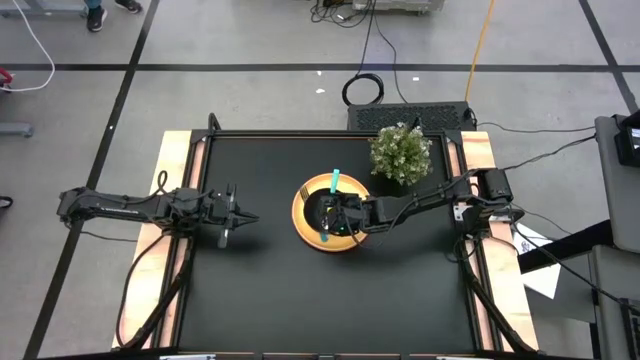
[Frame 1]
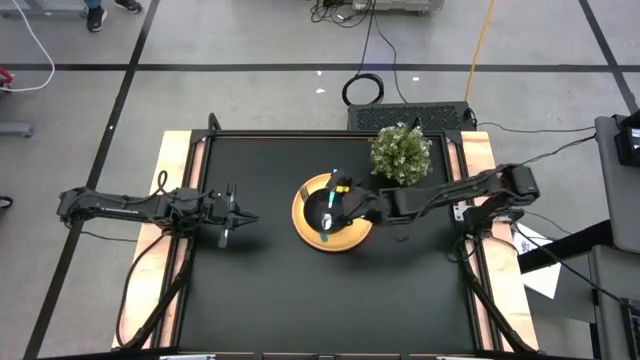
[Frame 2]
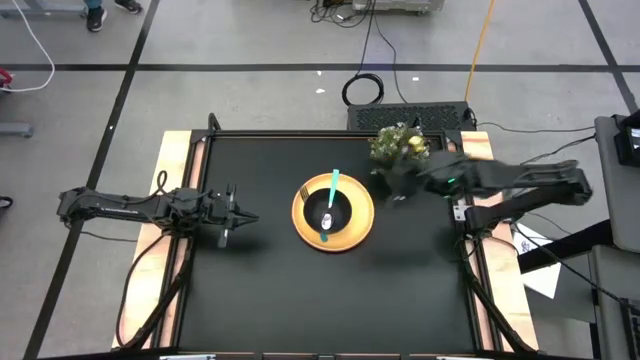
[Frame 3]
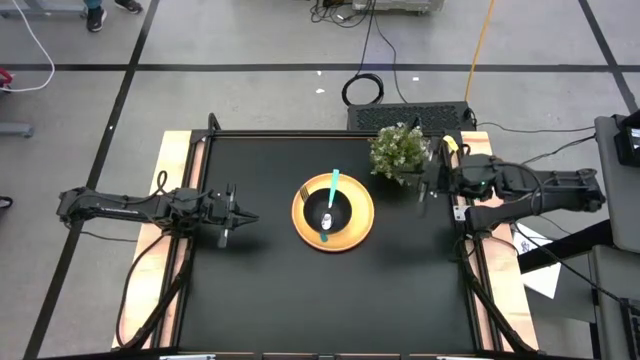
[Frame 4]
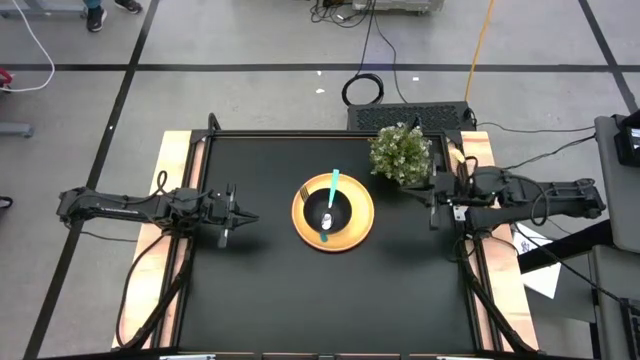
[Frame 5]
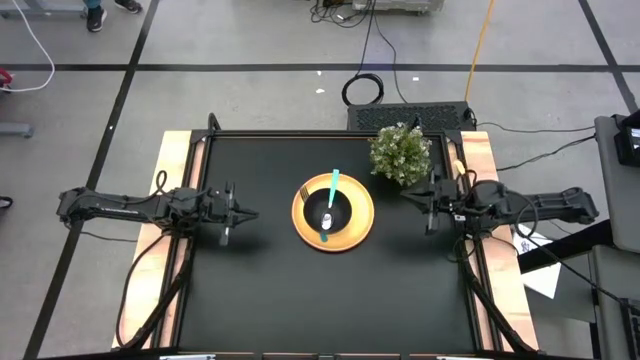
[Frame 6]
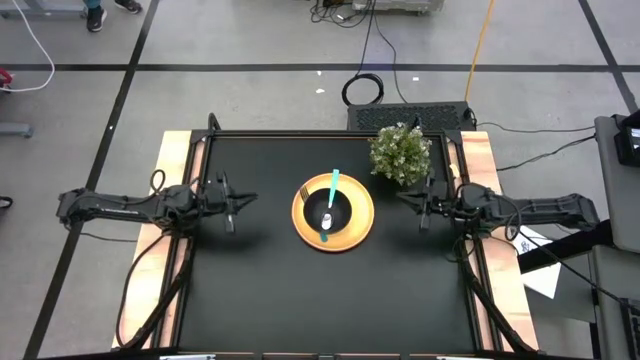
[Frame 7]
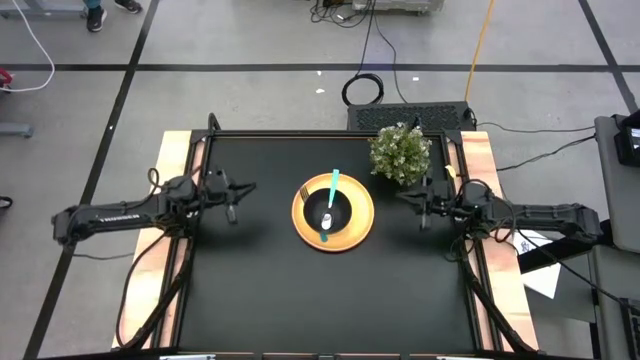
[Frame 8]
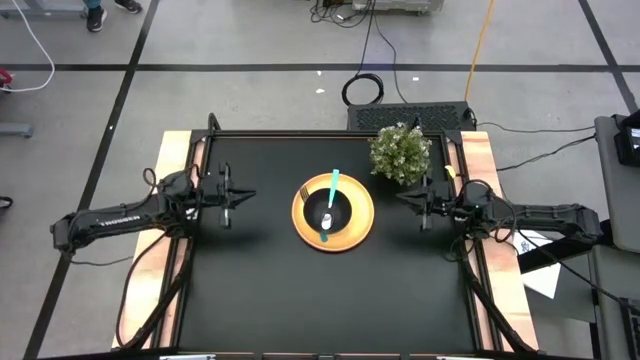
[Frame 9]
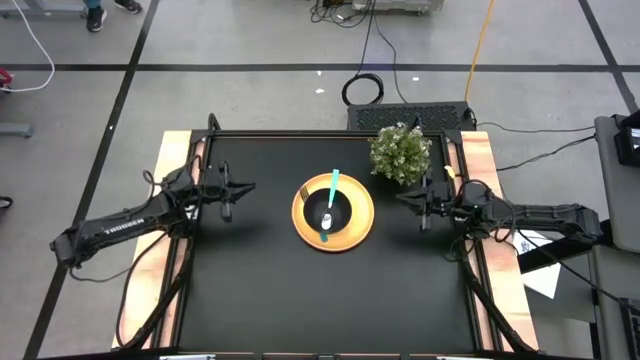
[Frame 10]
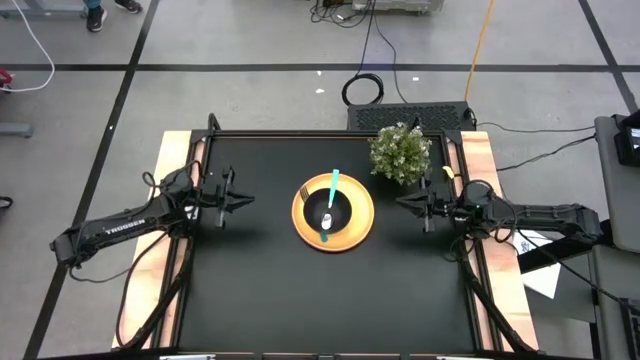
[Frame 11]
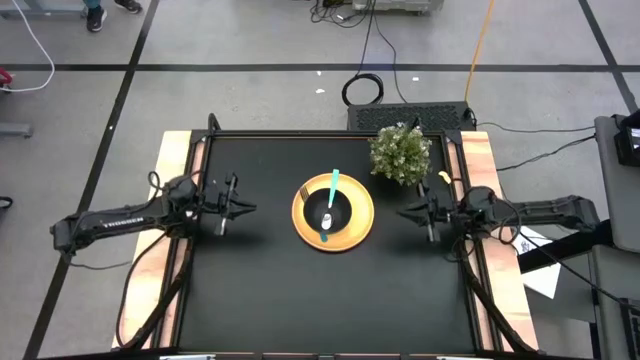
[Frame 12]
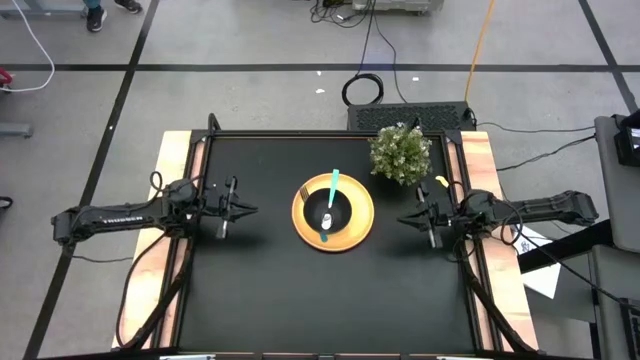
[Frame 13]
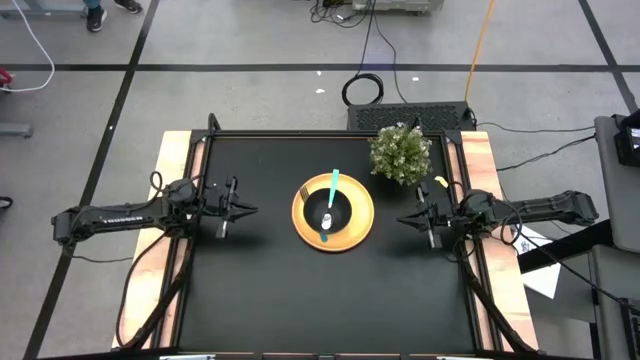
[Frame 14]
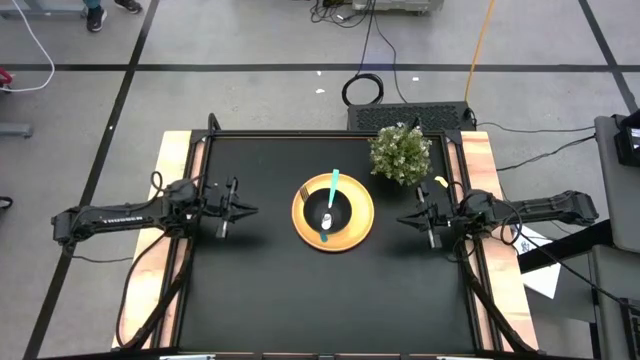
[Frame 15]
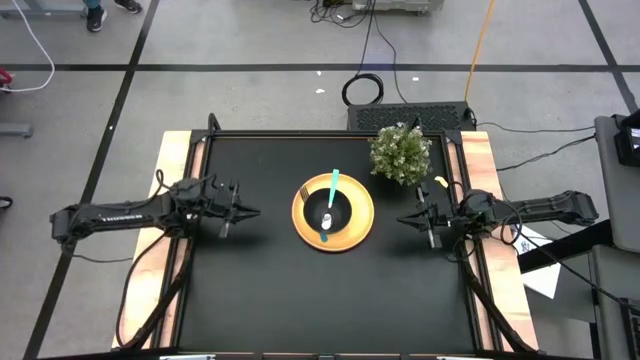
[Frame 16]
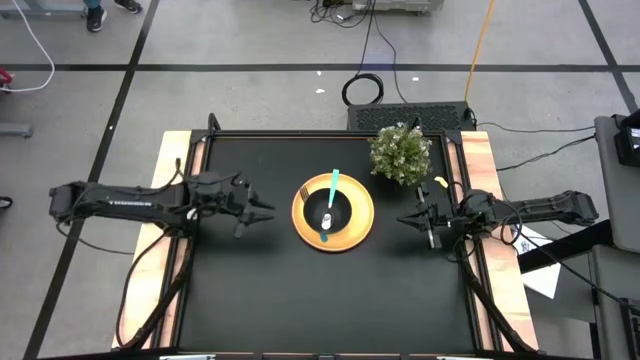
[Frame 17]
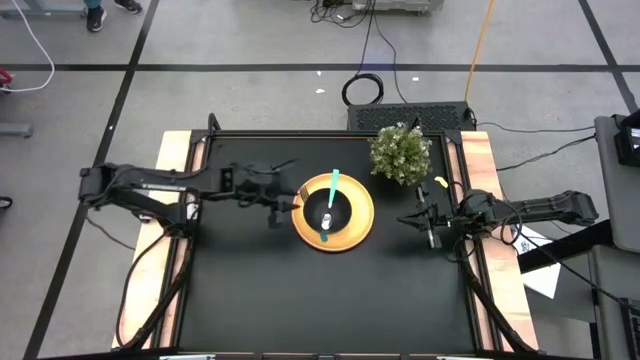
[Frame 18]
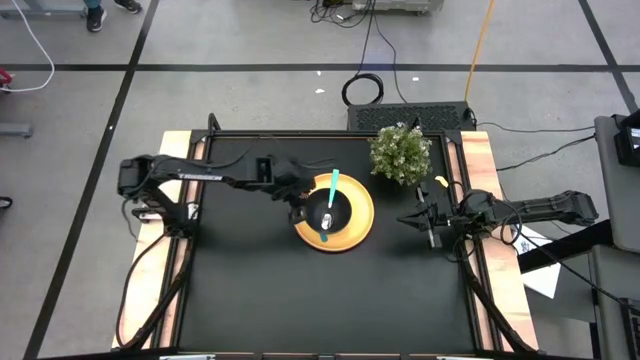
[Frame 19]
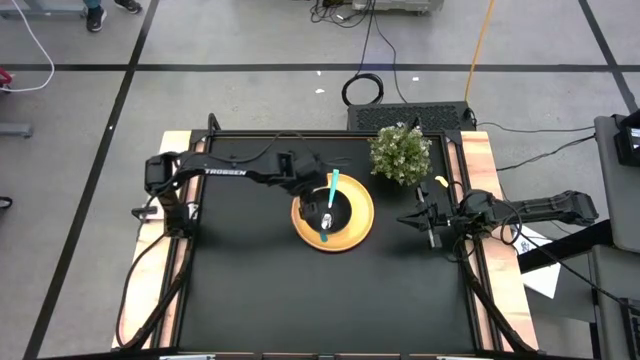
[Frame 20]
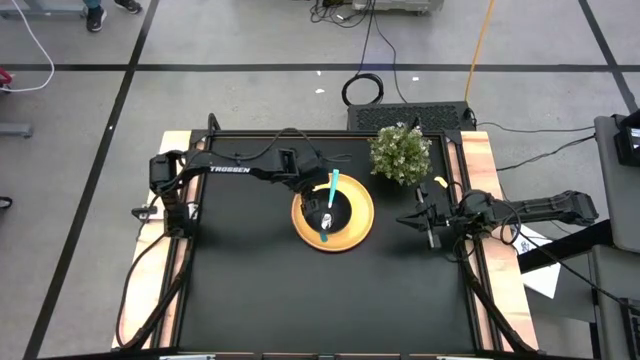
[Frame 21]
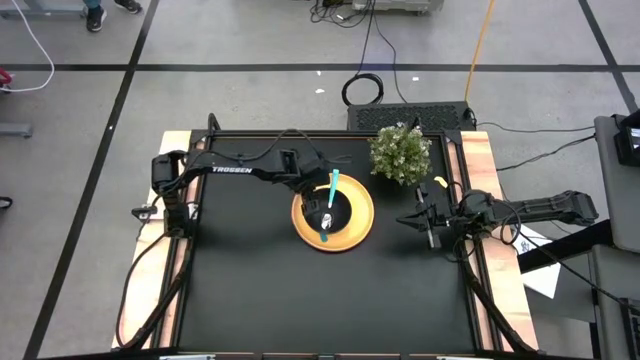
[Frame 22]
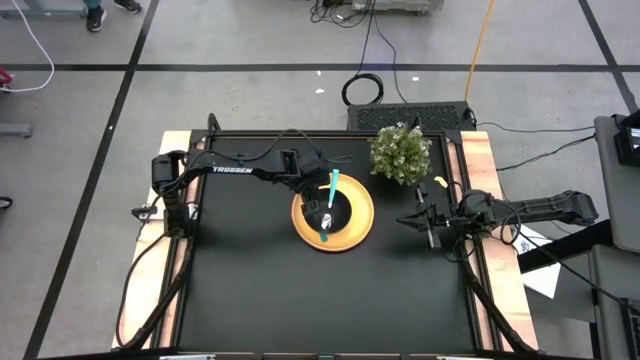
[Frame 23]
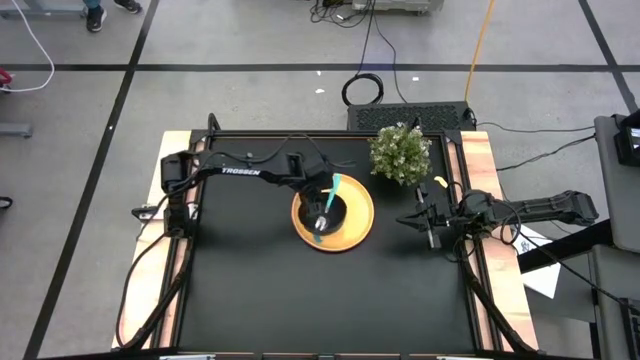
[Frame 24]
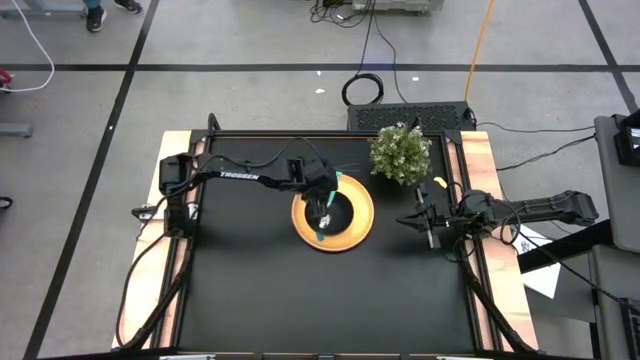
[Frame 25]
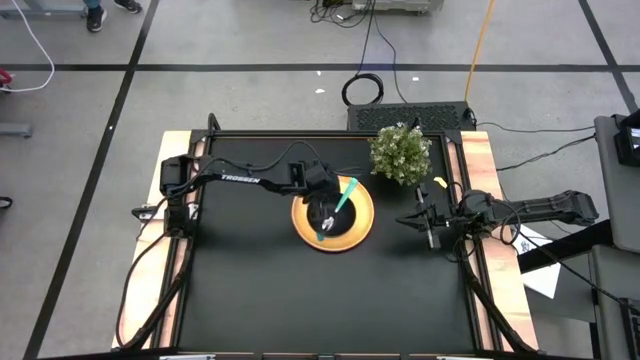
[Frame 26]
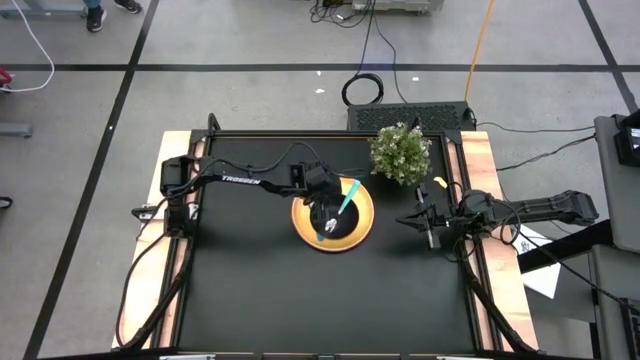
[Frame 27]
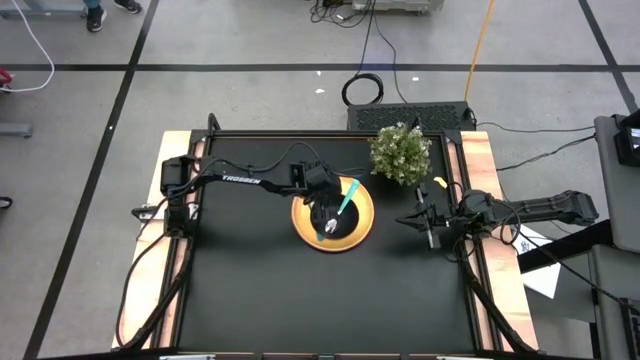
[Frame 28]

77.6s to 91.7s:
Task: Set table place
Adjust the black bowl on the yellow plate

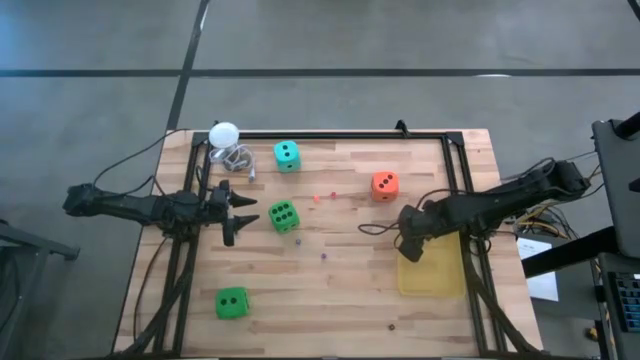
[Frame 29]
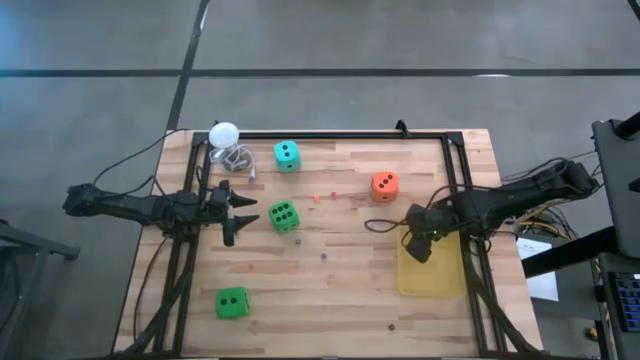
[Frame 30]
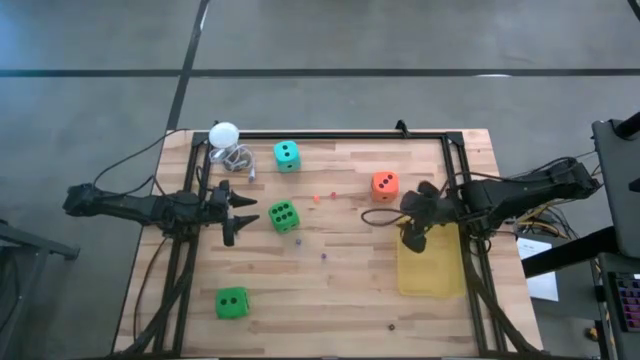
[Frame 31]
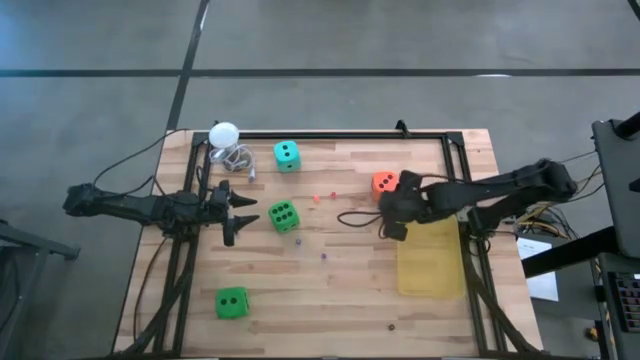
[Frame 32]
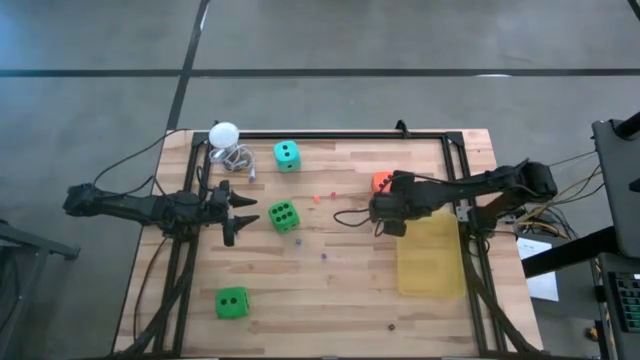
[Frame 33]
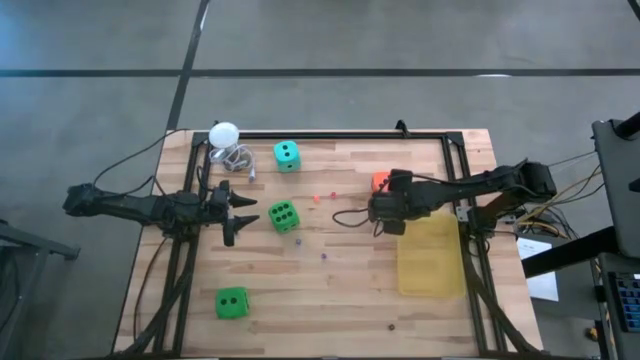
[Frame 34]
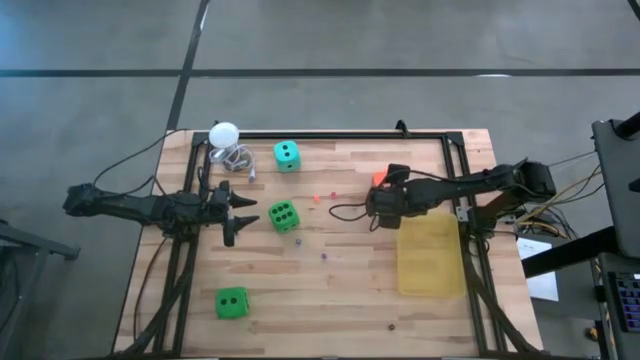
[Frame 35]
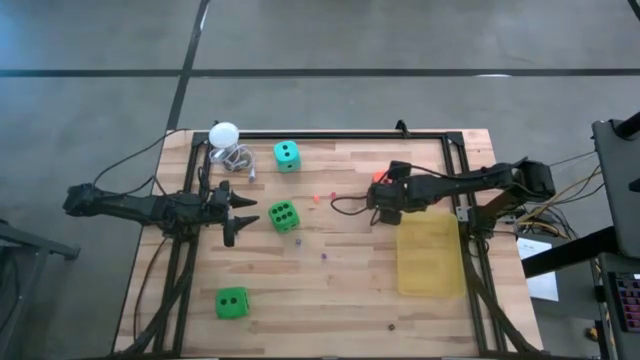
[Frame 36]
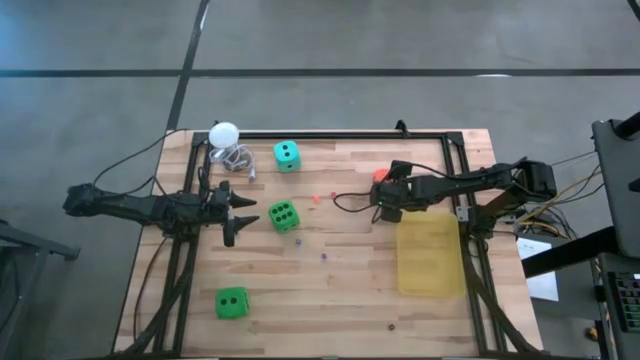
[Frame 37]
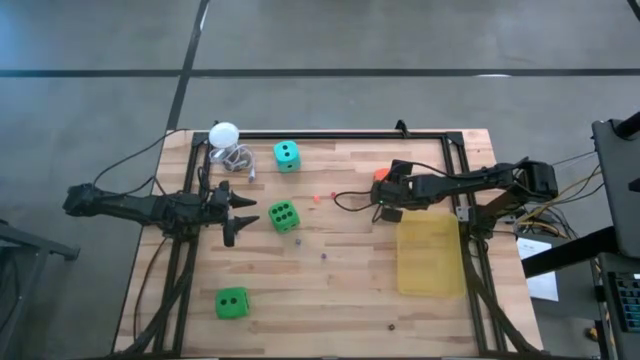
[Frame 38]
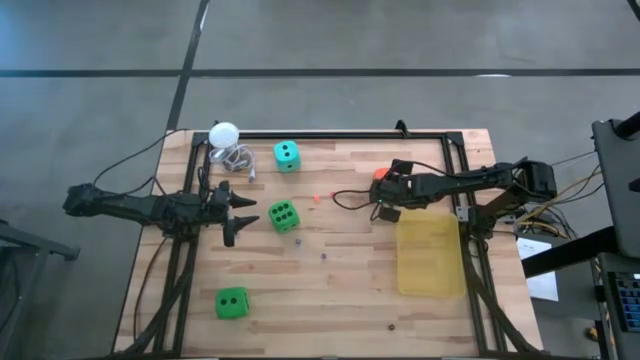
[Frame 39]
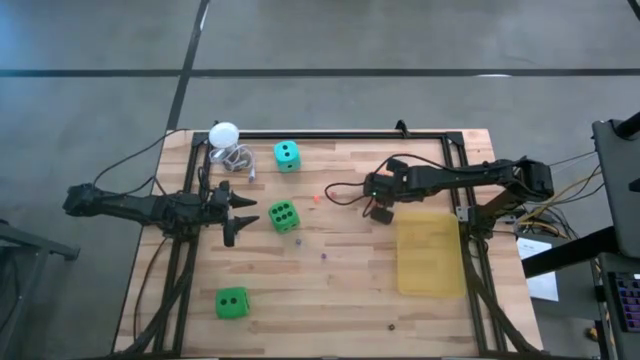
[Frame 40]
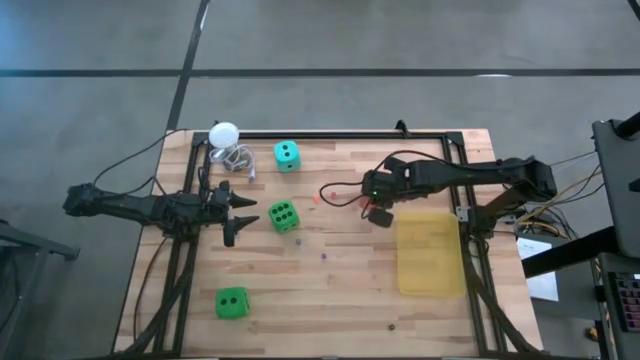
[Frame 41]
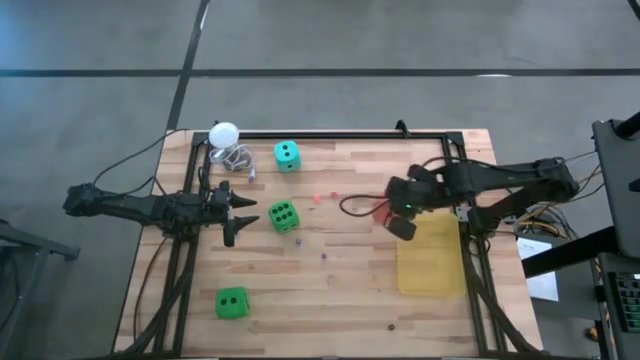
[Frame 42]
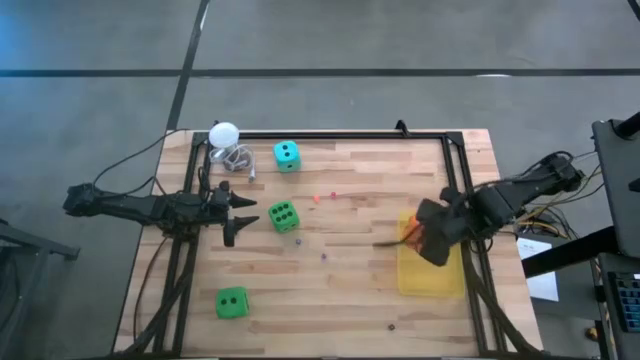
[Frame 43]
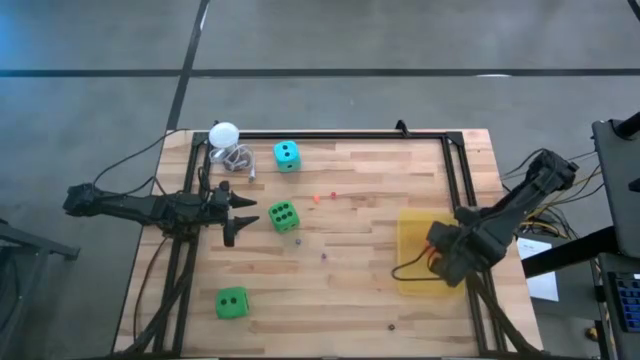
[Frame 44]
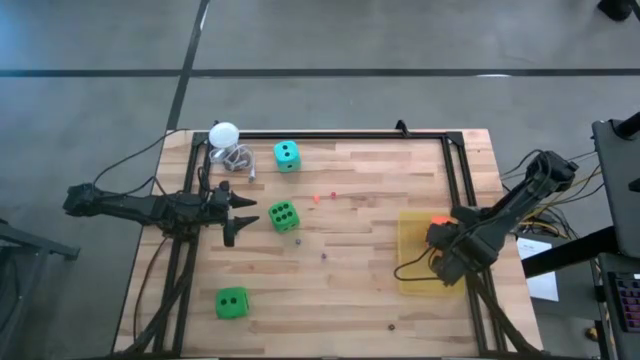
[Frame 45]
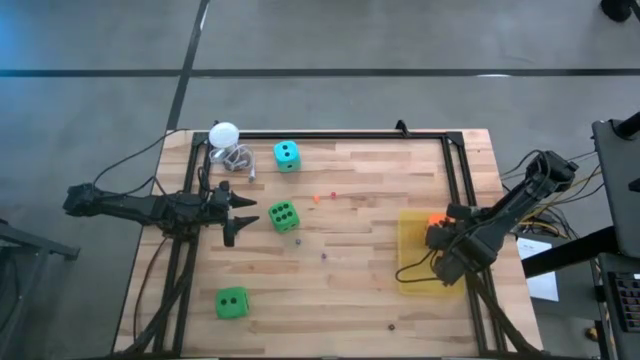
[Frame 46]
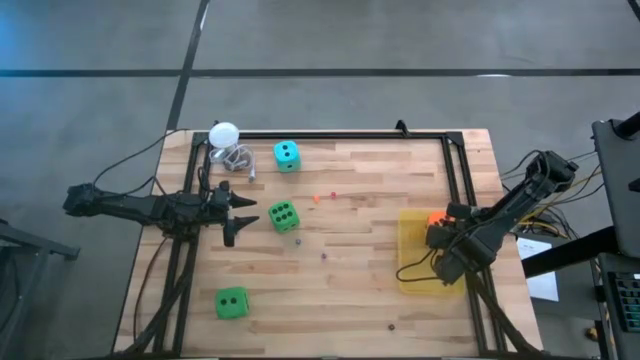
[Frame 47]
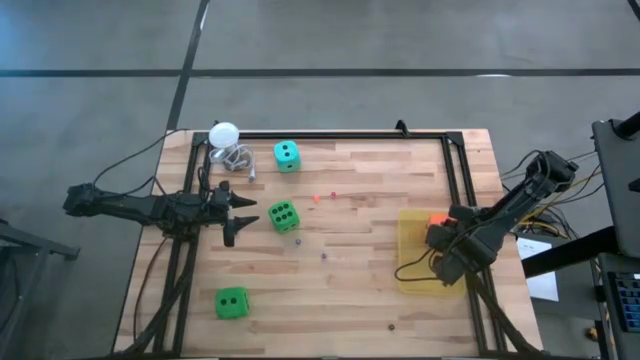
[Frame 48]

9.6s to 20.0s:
Task: Pick & Place Dice
Put the large orange dice into the yellow bin
